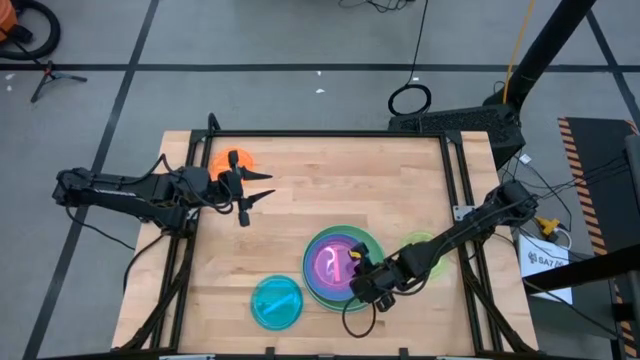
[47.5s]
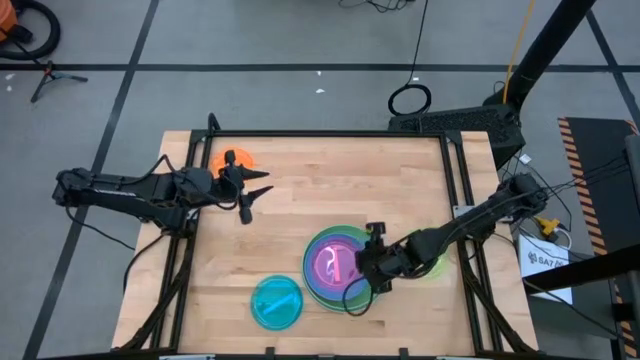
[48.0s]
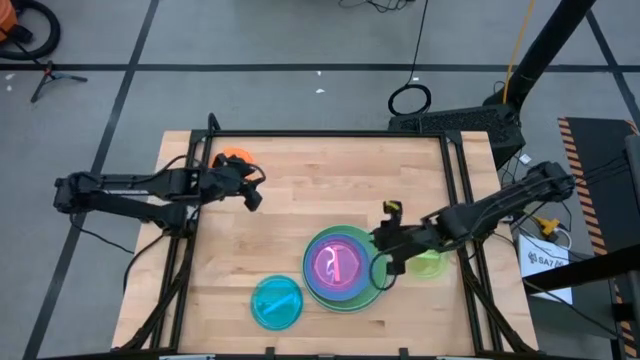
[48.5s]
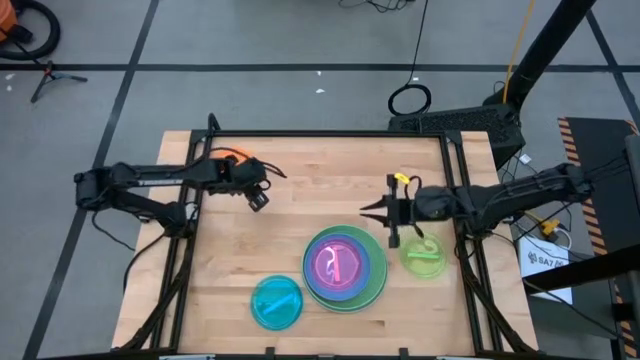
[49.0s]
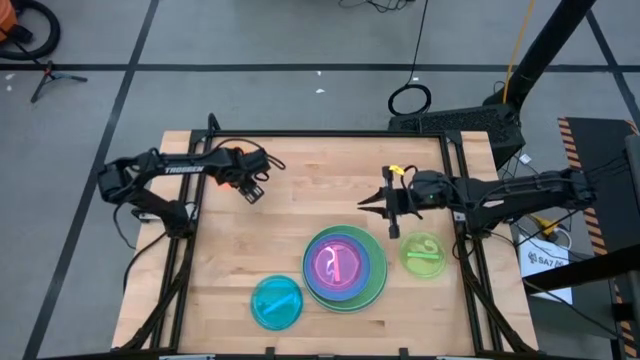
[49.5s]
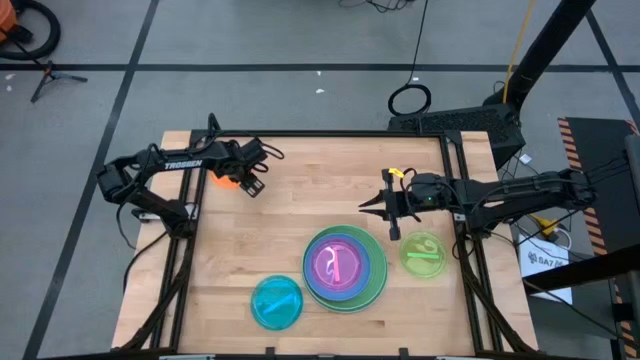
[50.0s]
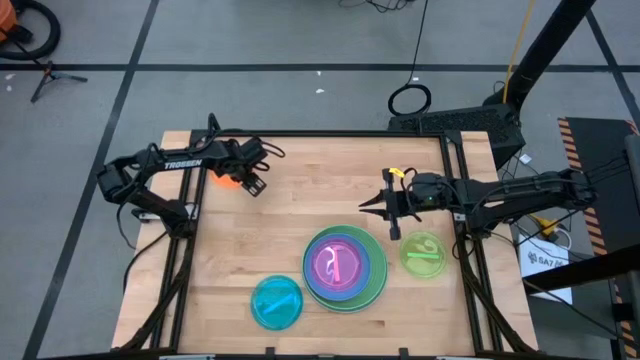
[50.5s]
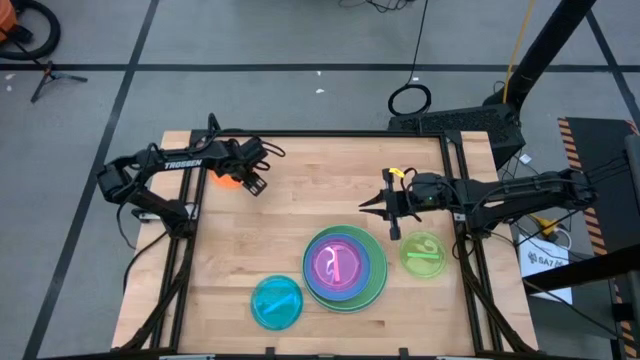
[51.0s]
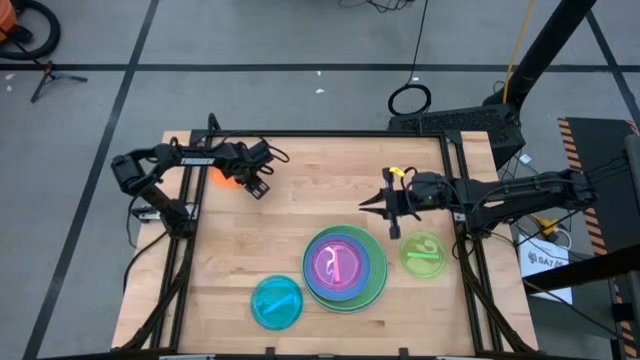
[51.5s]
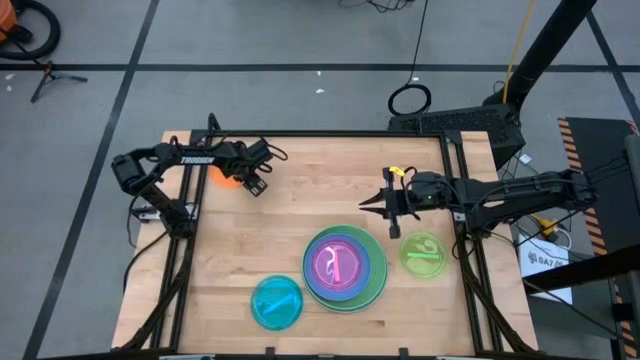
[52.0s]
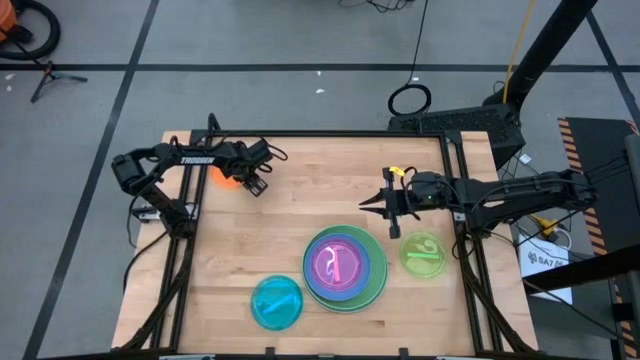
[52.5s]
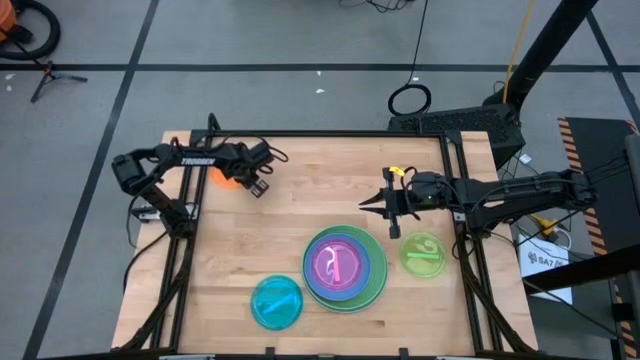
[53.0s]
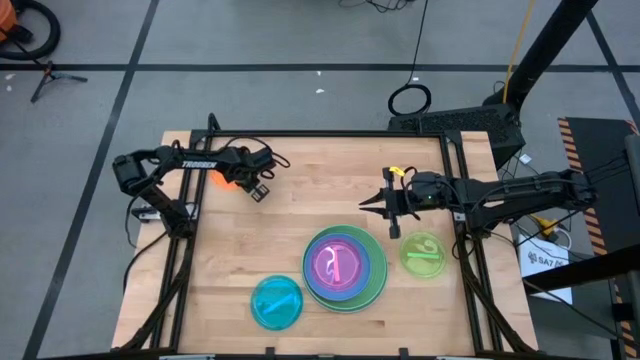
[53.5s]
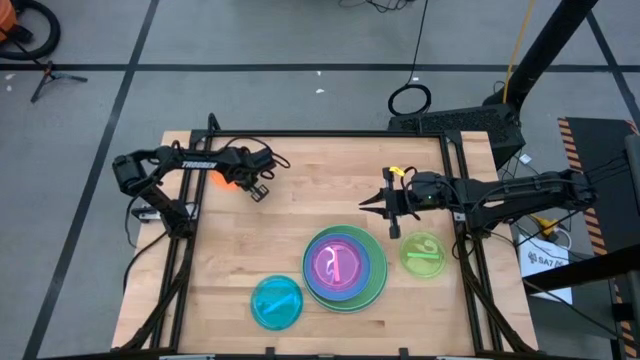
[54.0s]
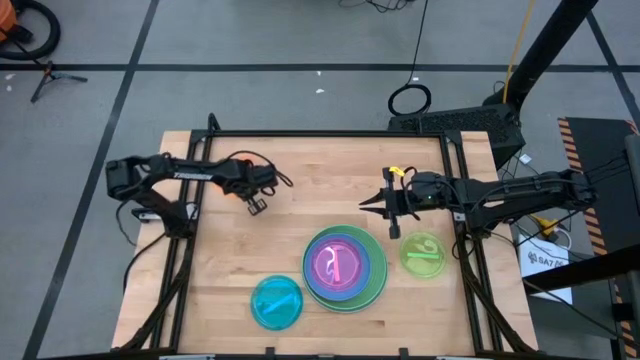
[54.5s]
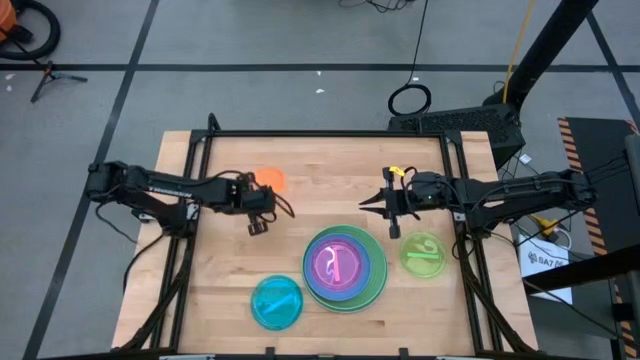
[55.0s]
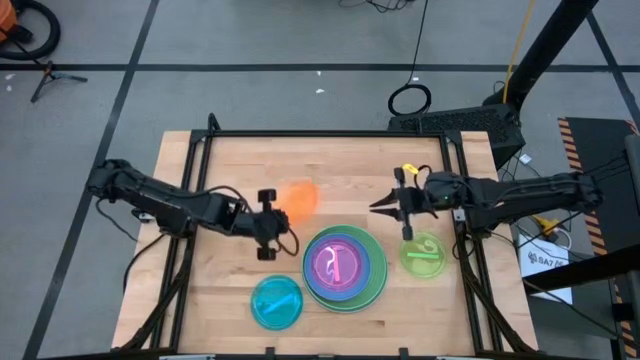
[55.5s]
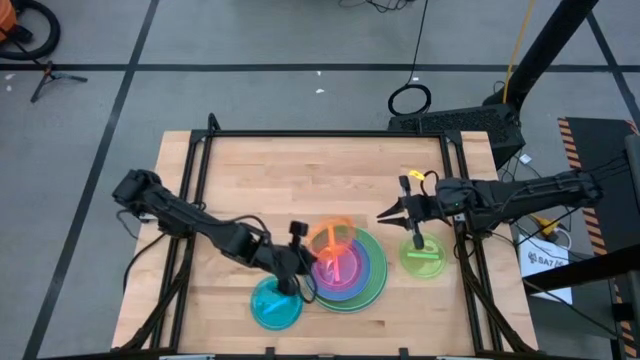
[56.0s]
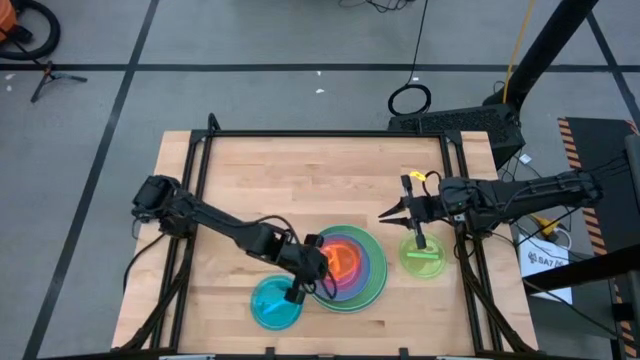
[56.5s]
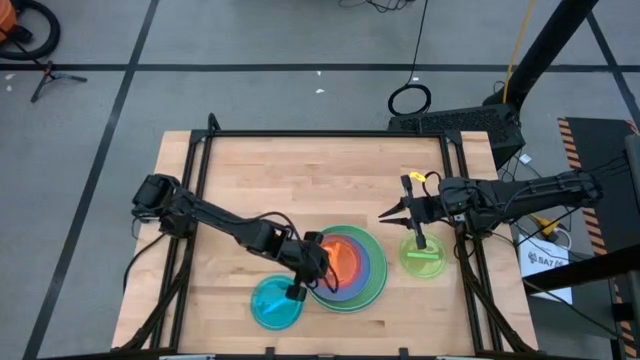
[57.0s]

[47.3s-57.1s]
Task: Stack plastic plates
Stack the transparent orange plate on the transparent pink plate

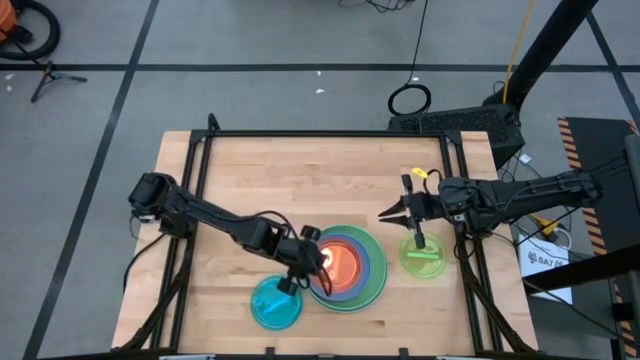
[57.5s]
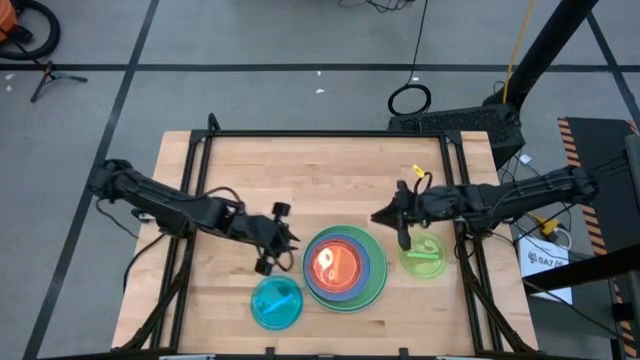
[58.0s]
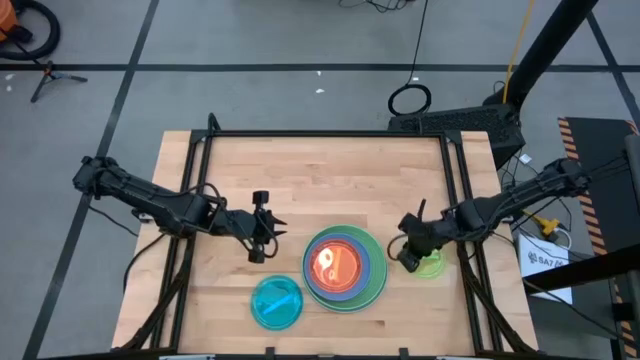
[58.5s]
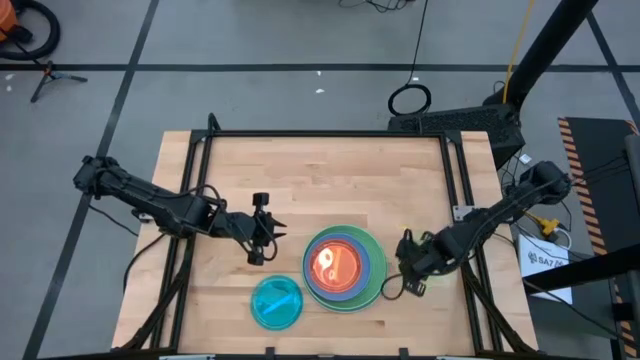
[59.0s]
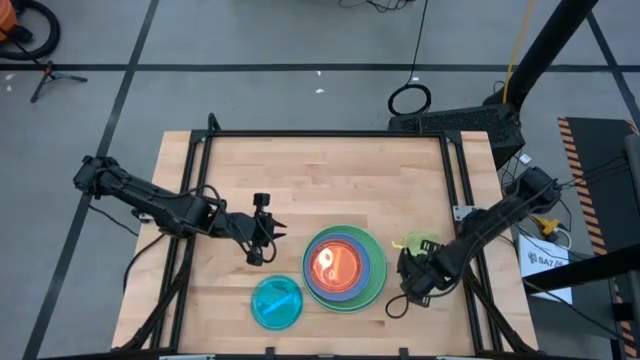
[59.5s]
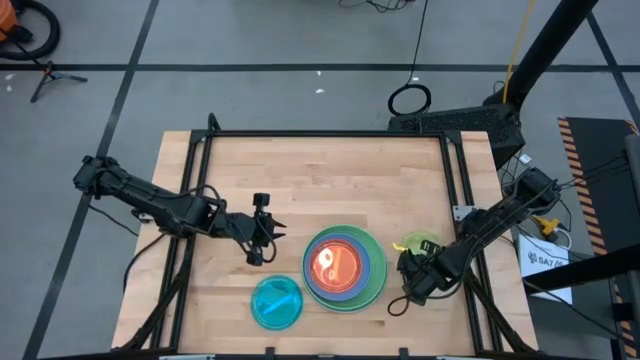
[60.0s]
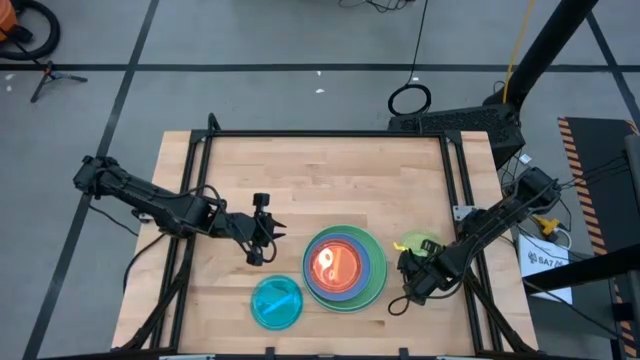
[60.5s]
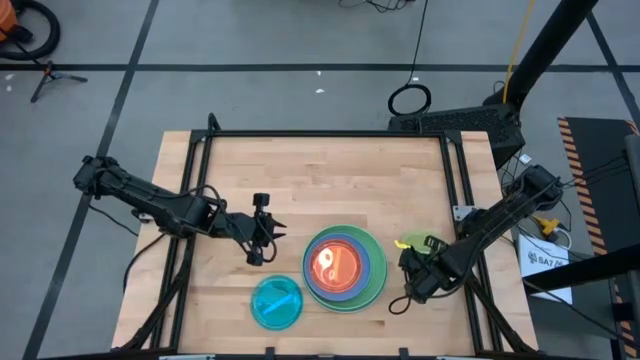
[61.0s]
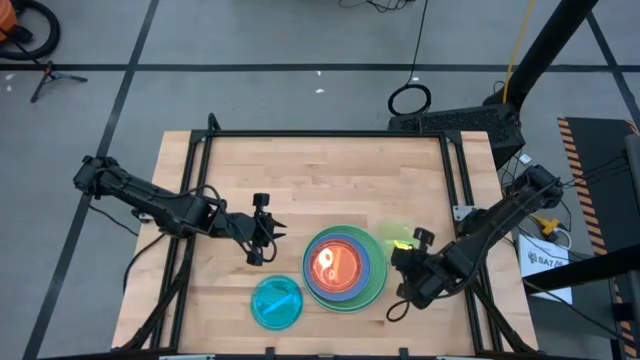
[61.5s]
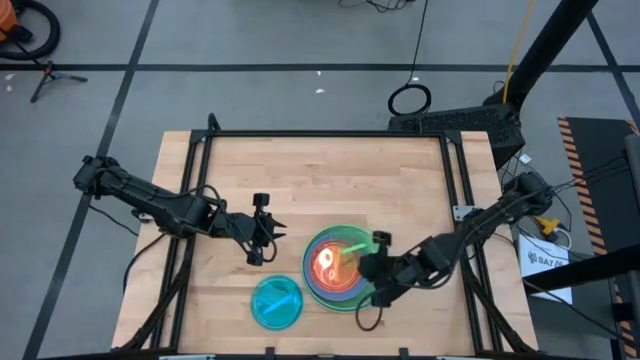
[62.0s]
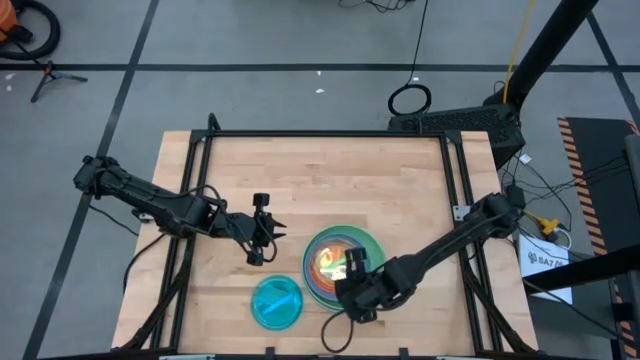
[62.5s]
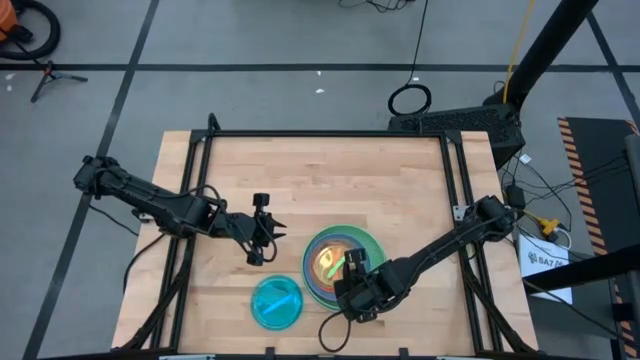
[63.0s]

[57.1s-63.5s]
Stack the transparent green plate on the transparent orange plate

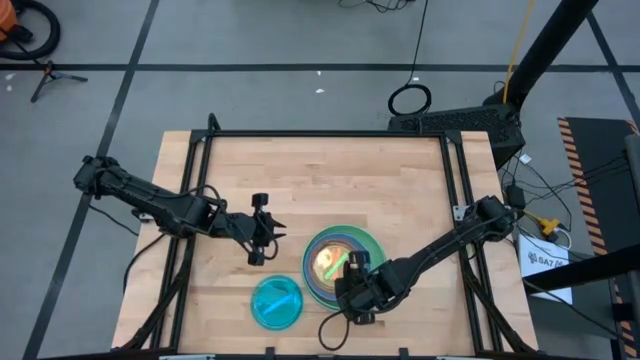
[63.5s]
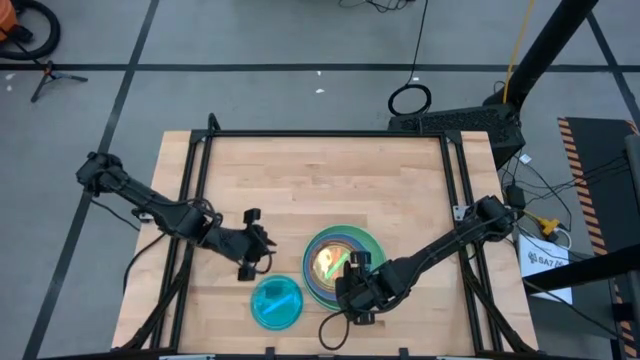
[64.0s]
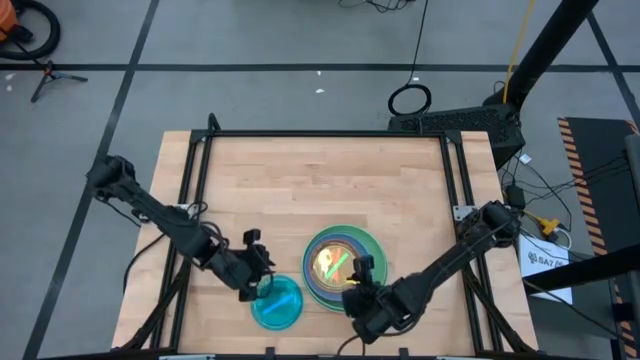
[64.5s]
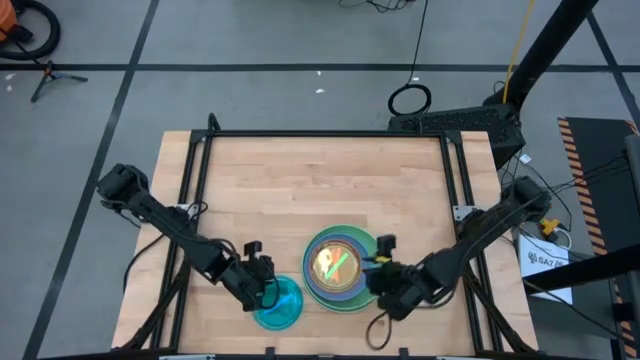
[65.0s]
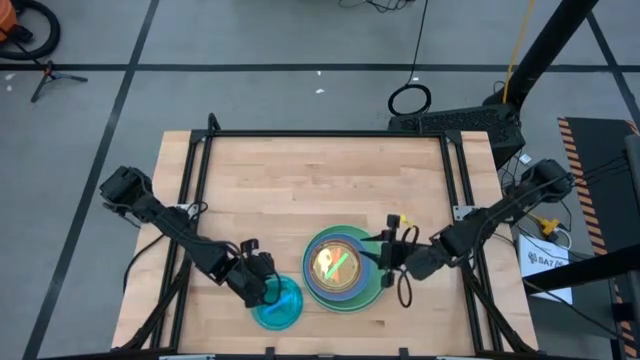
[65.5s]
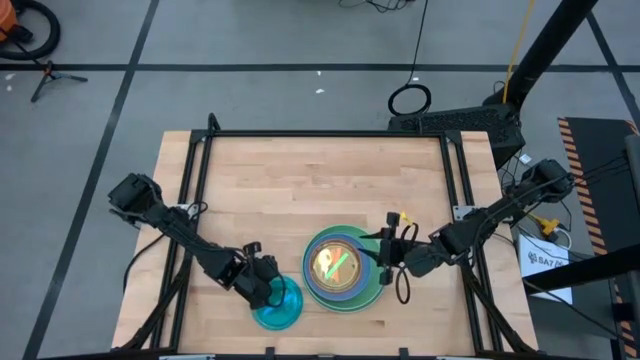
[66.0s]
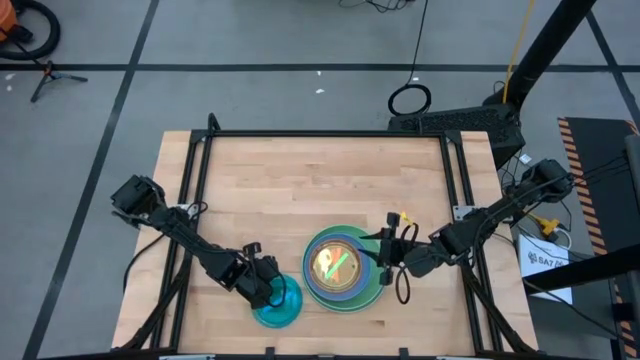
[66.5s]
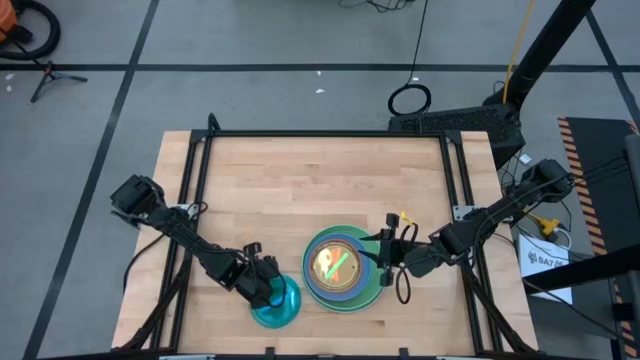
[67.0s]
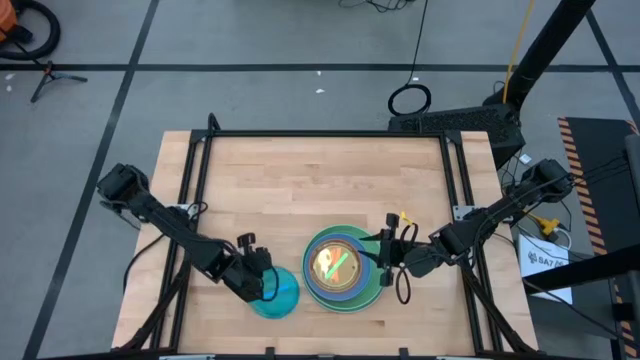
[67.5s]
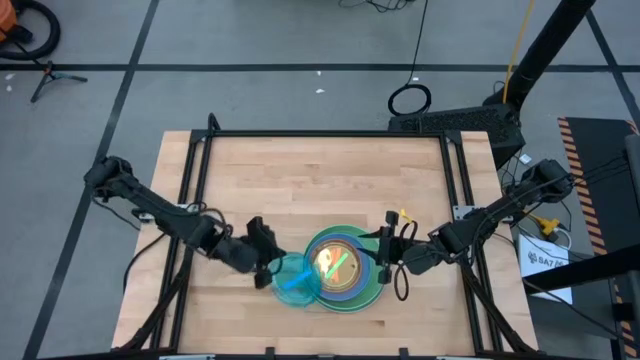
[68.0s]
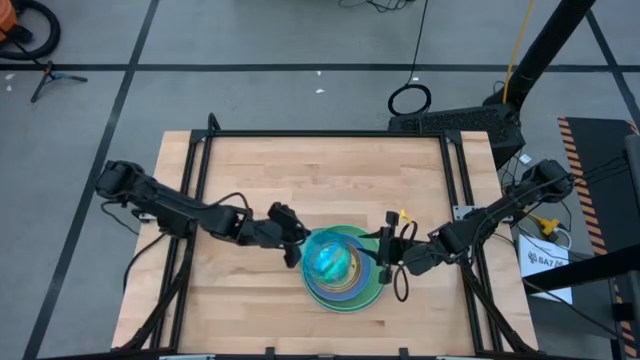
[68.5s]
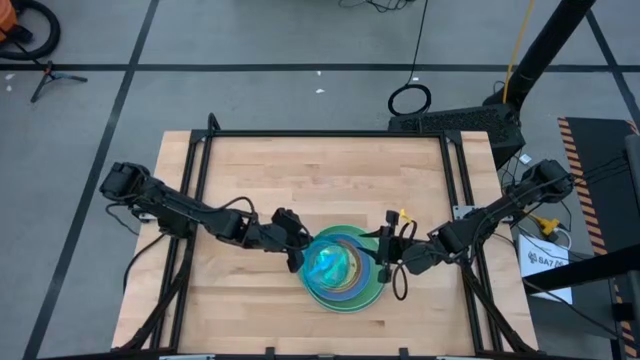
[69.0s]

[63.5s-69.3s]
Stack the transparent blue plate on the transparent green plate

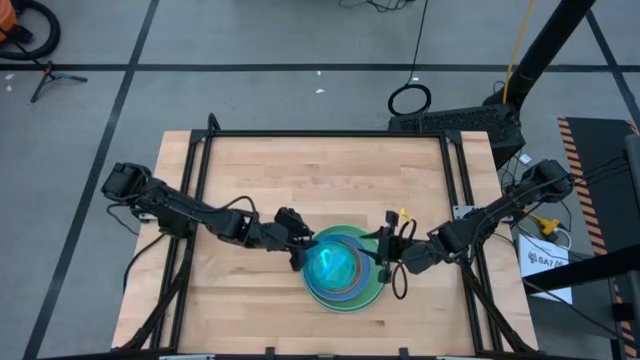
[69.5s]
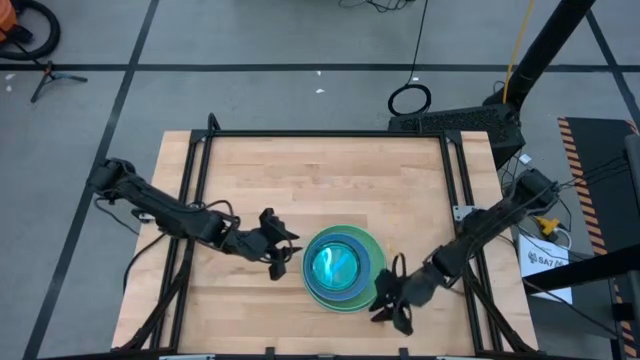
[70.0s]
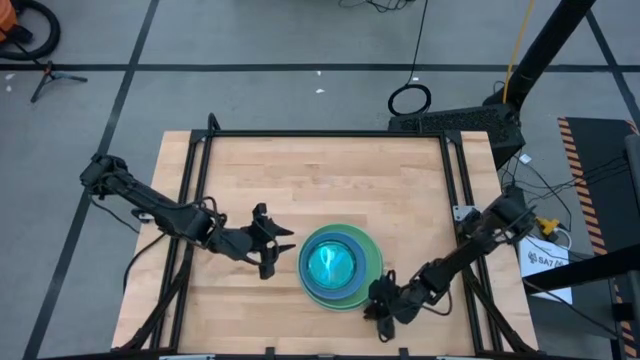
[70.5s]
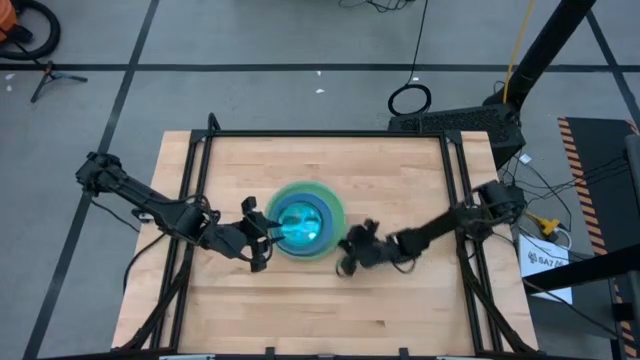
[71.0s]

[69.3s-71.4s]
Move the stacked plates from the bottom to the center of the table
